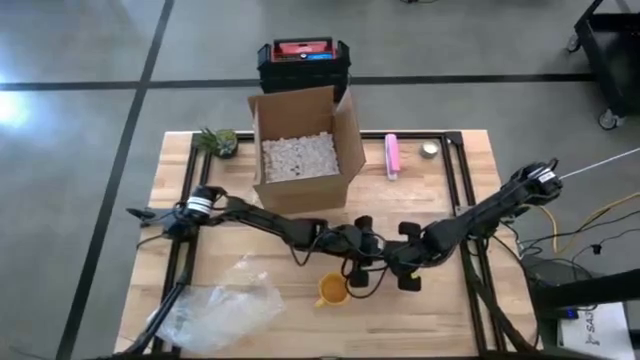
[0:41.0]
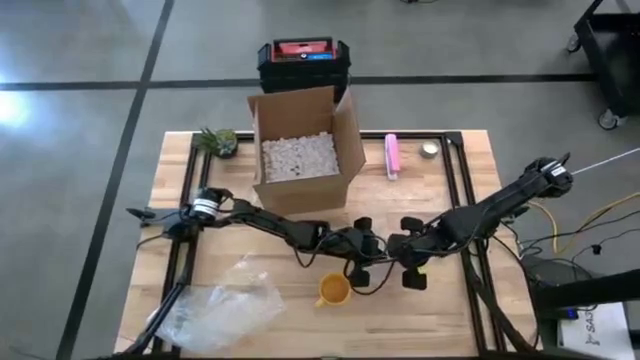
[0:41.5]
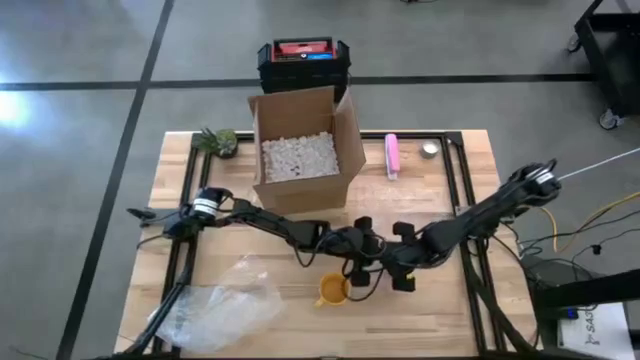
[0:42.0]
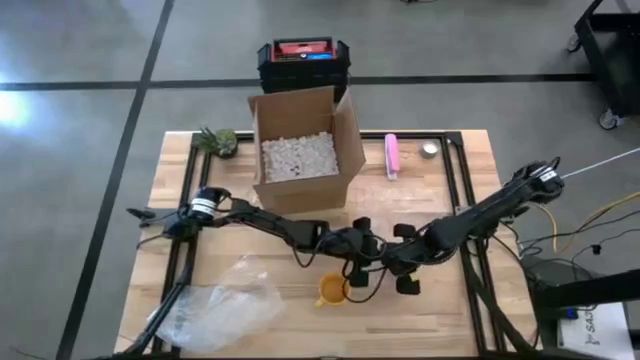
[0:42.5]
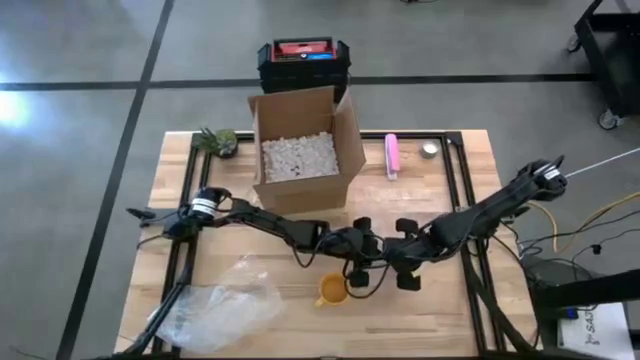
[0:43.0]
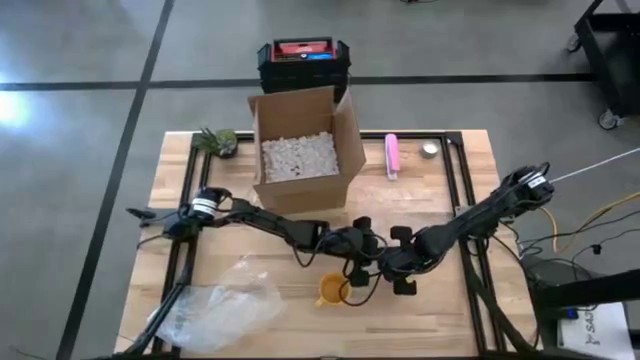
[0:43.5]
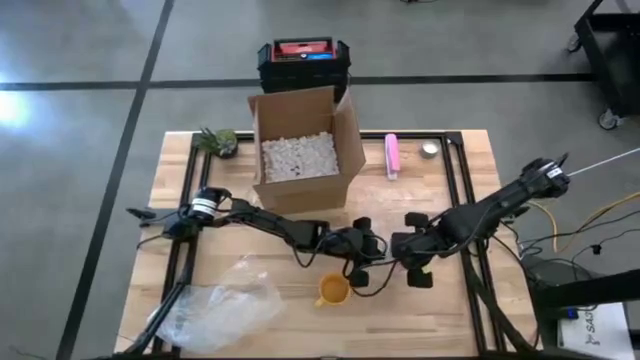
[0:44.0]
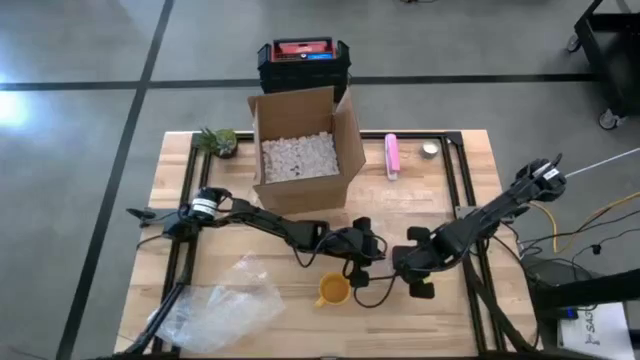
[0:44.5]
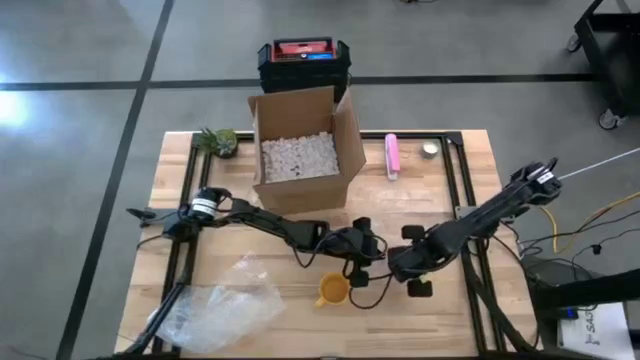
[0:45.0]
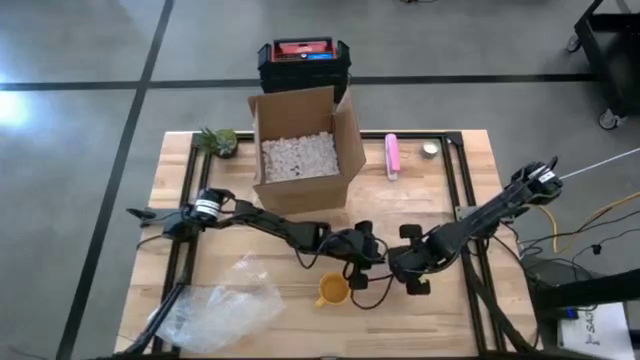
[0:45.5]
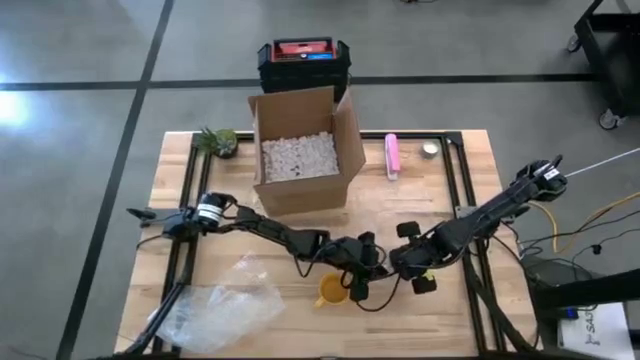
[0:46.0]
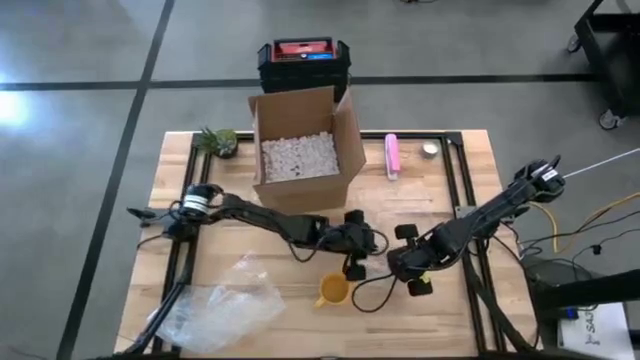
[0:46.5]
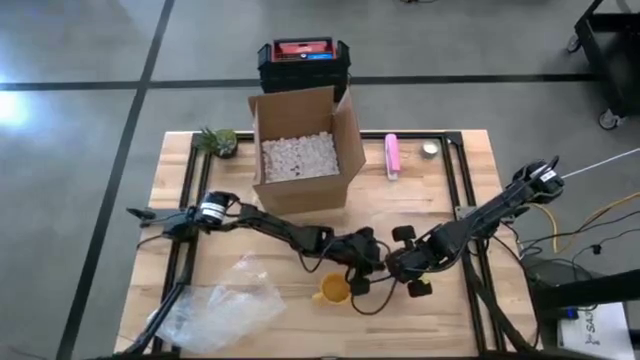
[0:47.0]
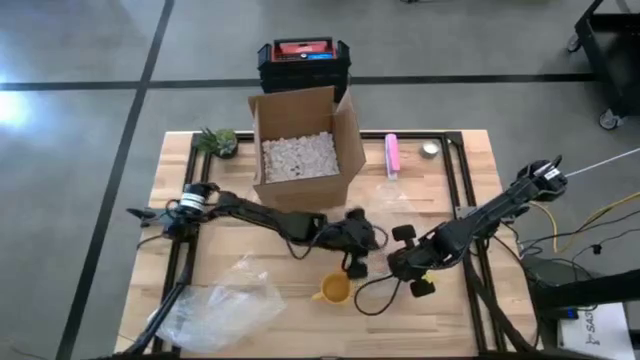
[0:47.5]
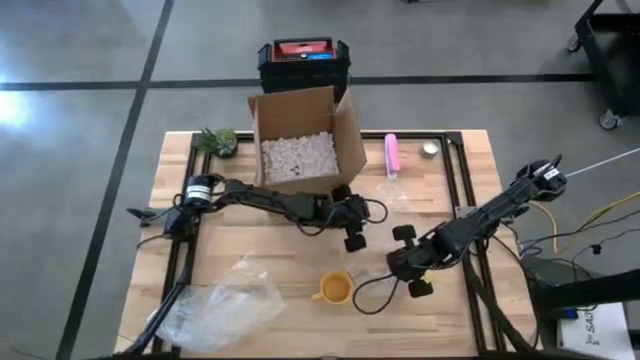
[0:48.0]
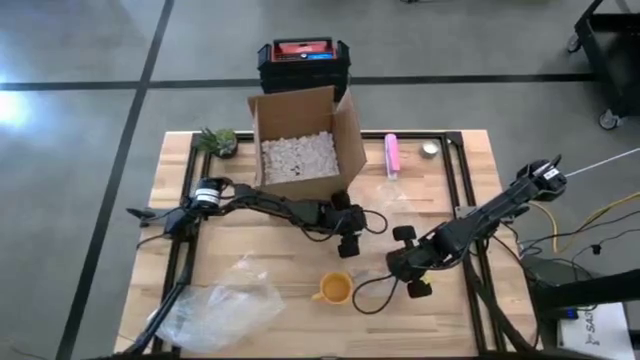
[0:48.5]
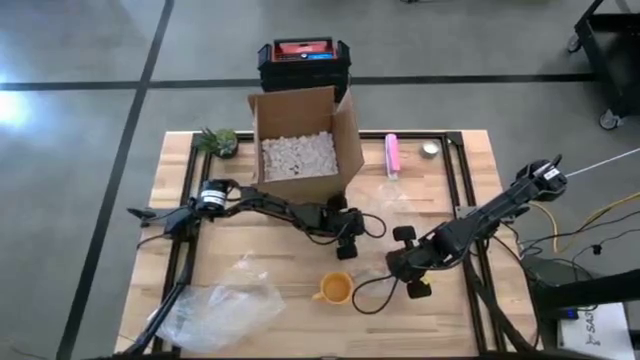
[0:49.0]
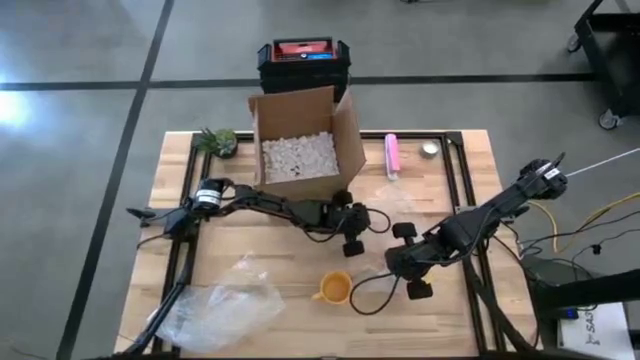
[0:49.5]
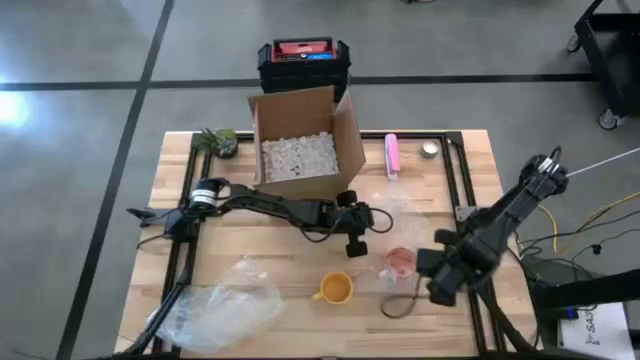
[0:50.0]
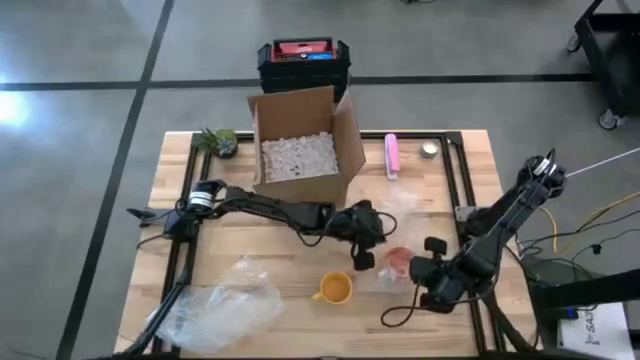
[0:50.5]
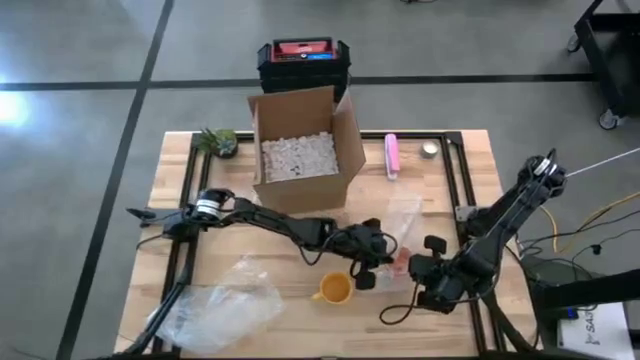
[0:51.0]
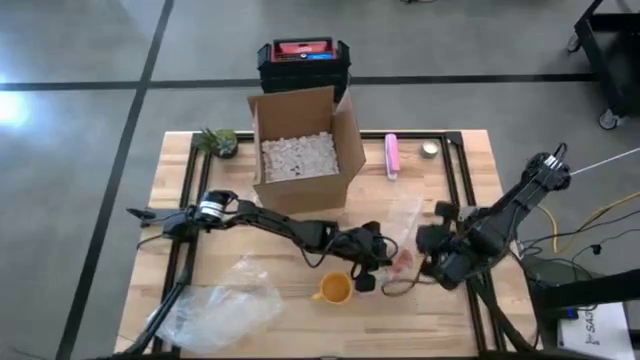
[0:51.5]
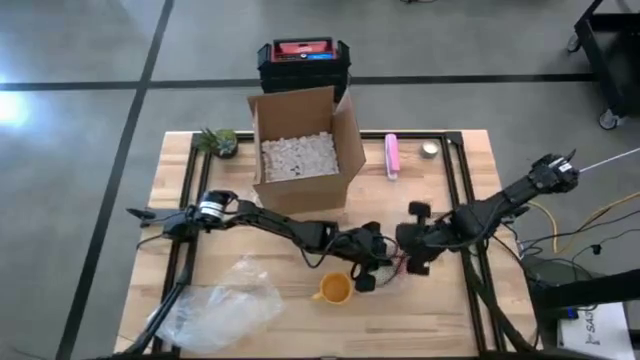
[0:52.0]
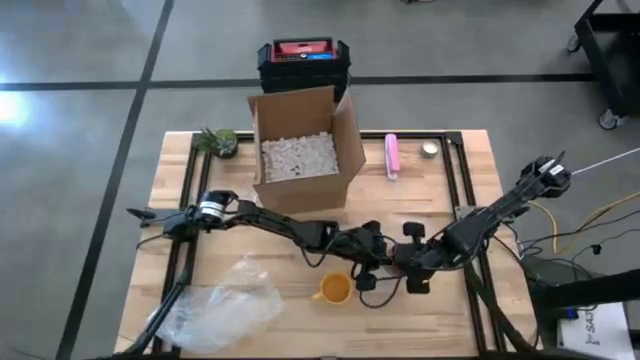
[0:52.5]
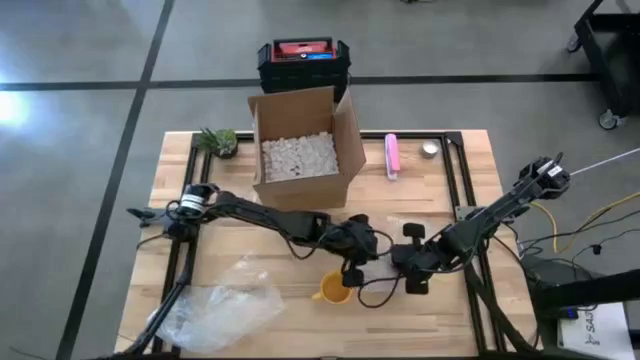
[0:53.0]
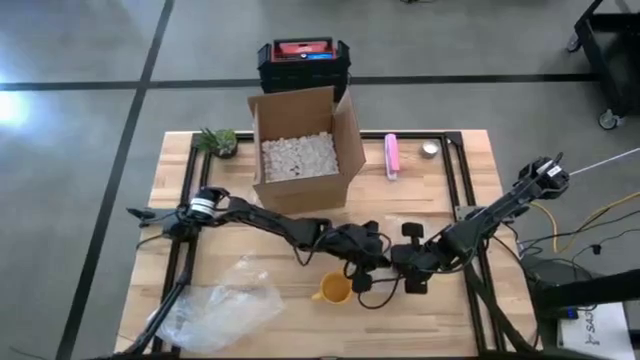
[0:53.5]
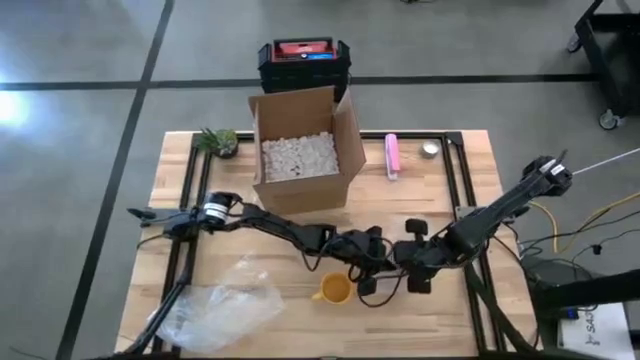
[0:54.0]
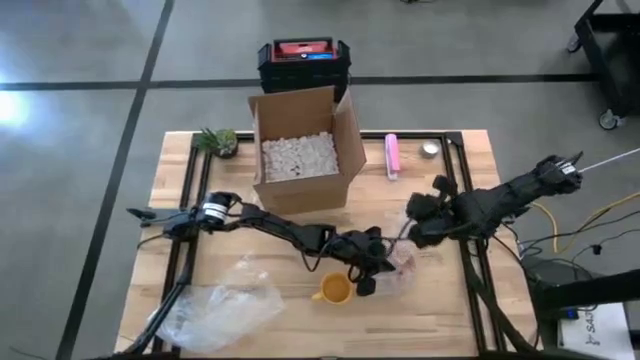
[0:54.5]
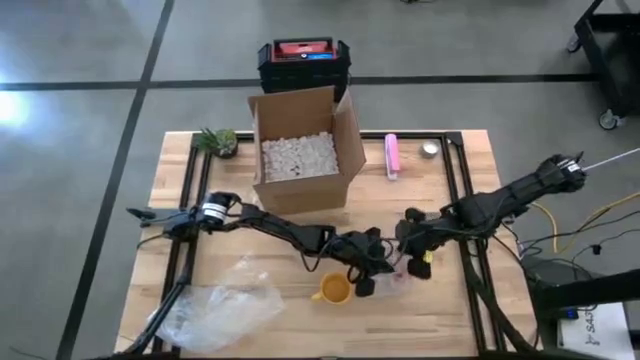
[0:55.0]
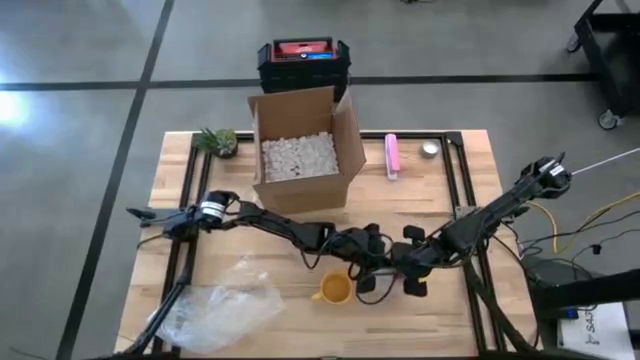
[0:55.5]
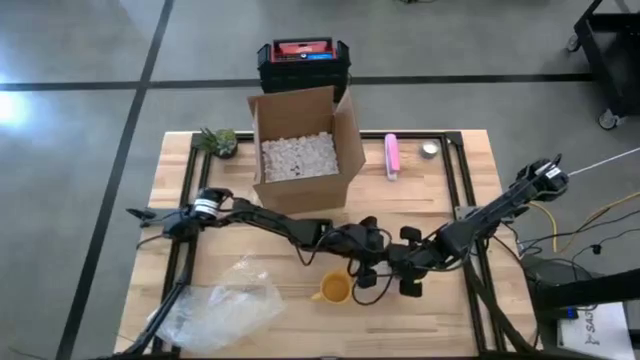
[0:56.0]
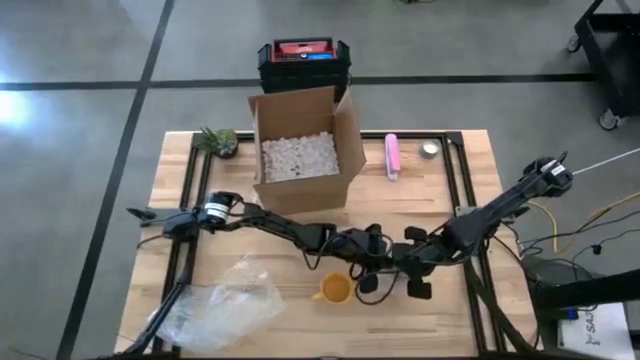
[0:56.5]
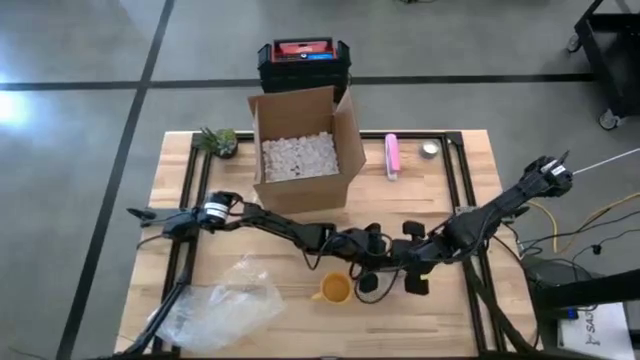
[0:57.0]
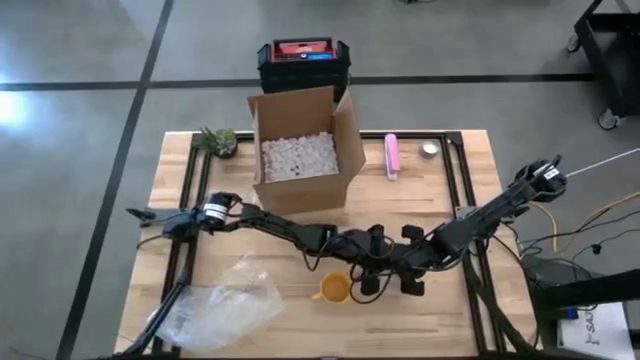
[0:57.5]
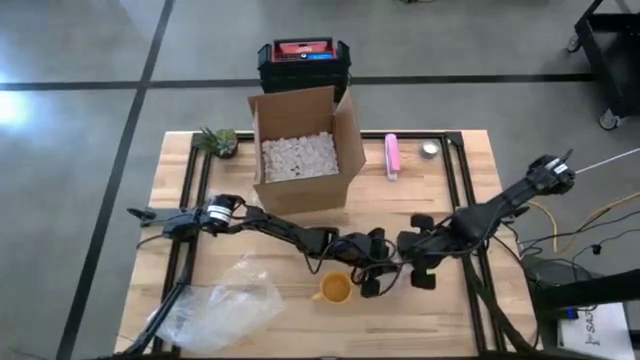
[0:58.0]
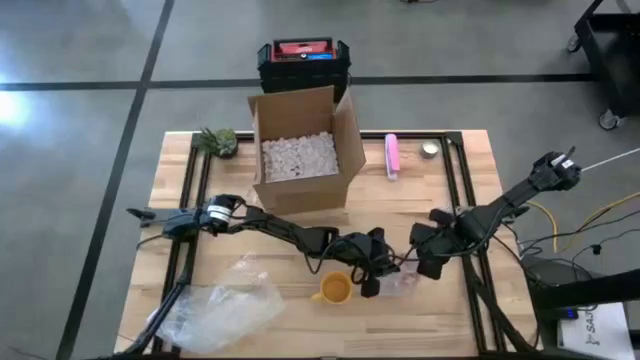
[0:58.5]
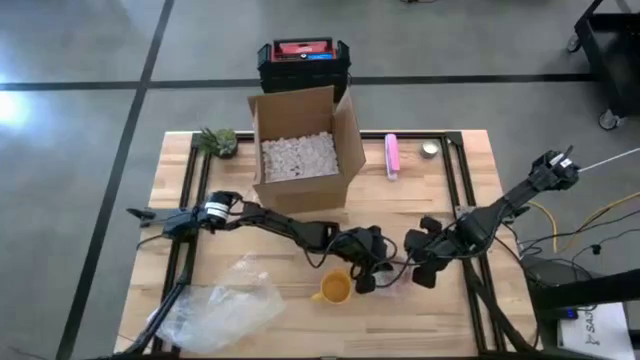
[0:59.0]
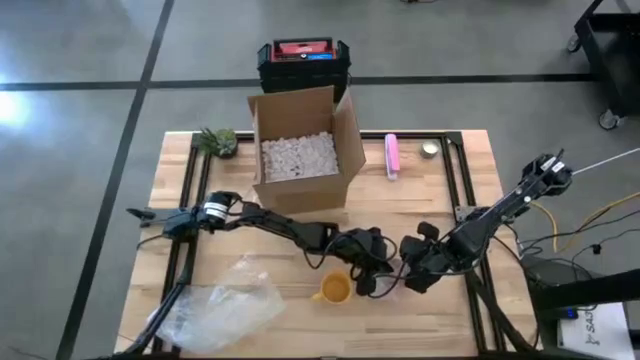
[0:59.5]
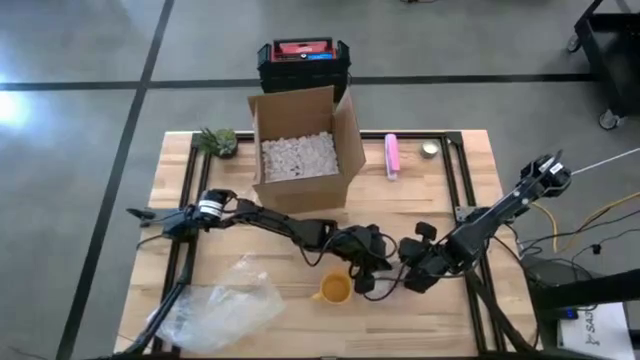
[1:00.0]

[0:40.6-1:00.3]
Task: wrap mug
Wrap the orange mug in the right transparent bubble wrap

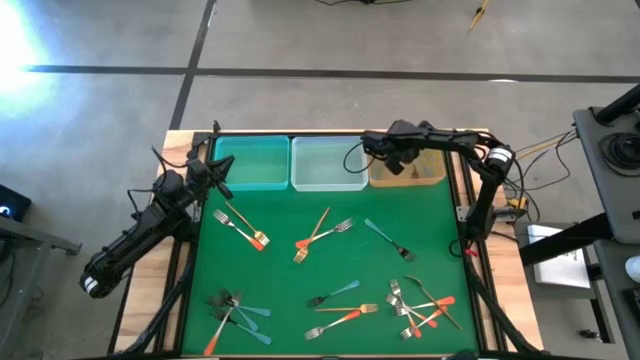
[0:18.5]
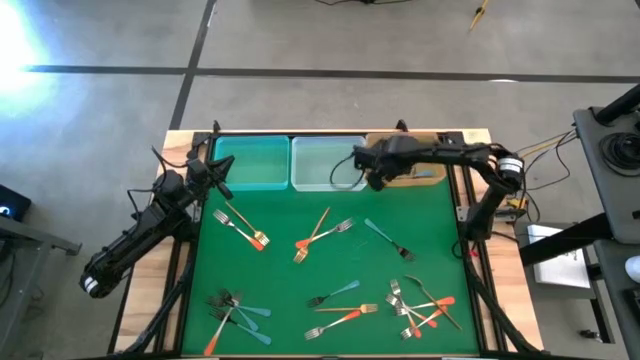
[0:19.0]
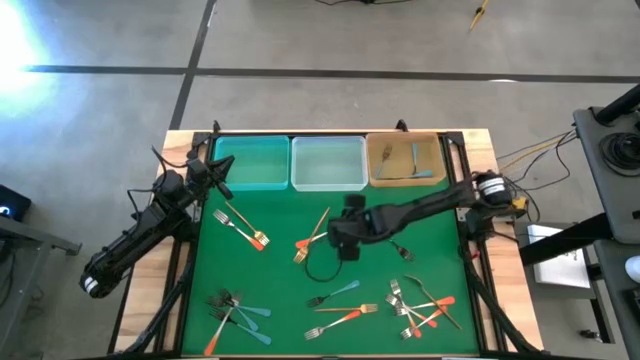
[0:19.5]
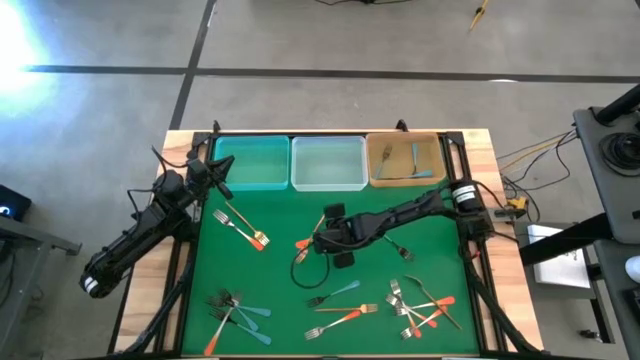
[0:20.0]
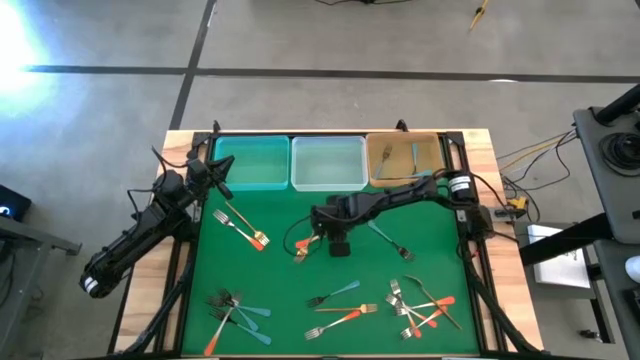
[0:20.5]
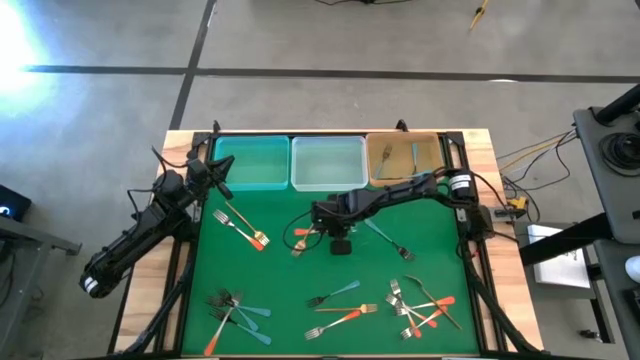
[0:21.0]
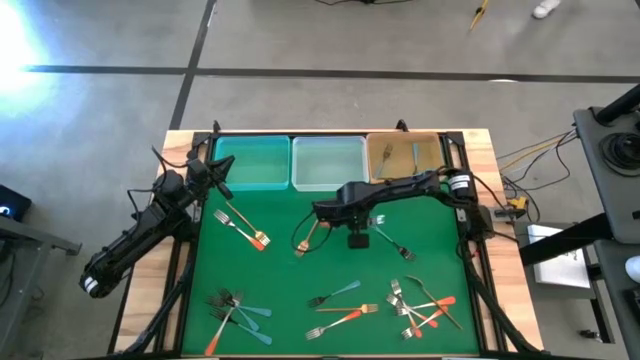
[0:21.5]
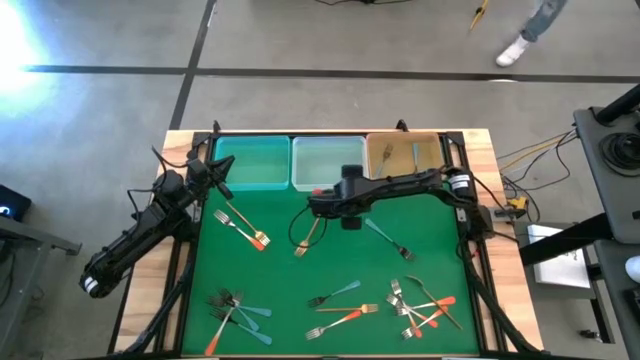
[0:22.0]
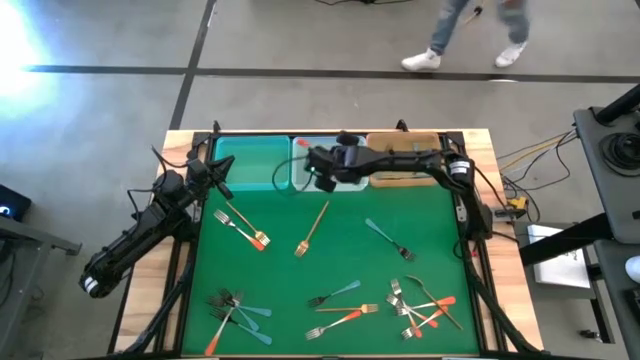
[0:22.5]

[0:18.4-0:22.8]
Task: Sort silverware by color (type)
Put the orange fork into the white bin
